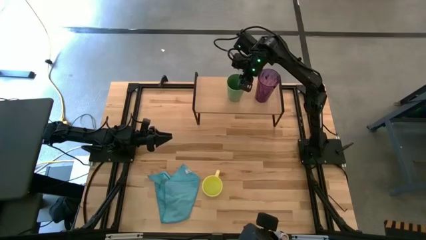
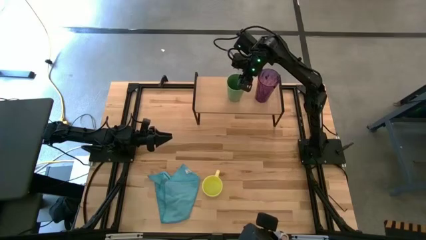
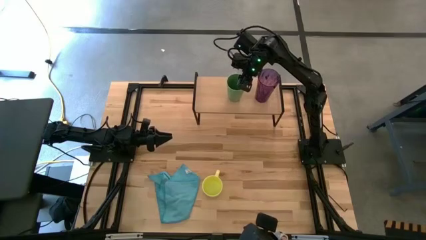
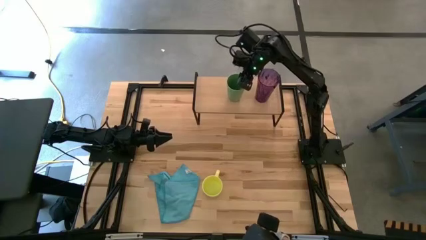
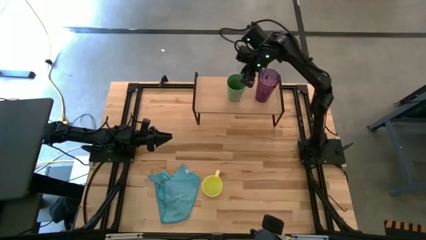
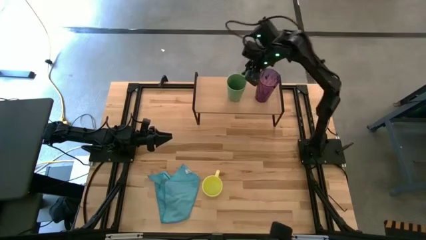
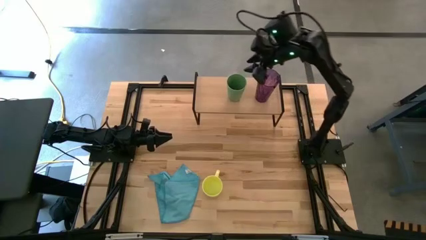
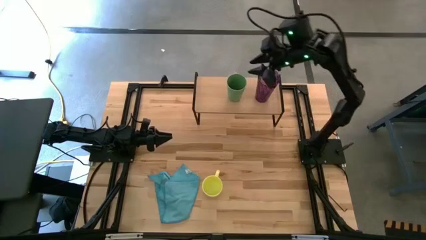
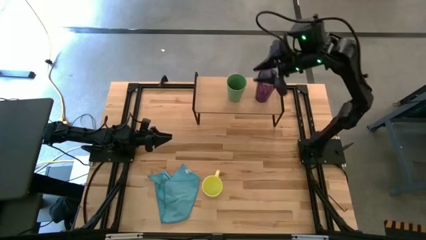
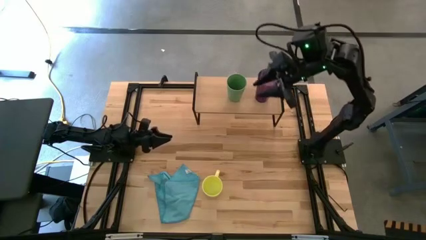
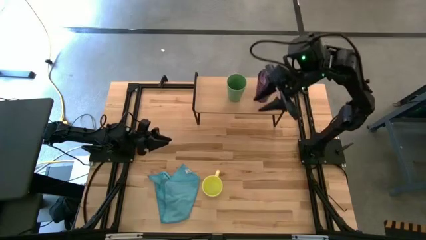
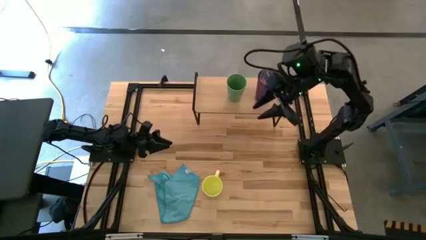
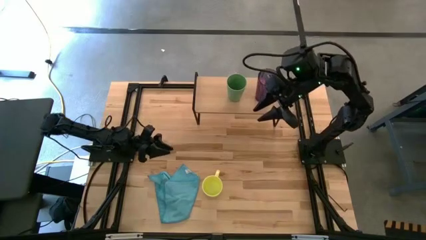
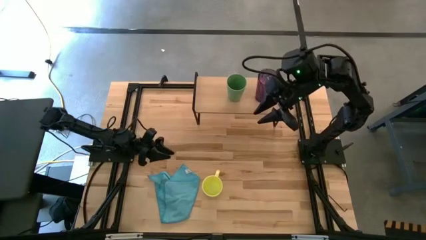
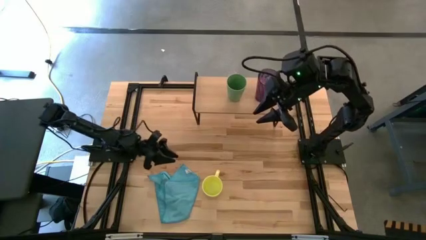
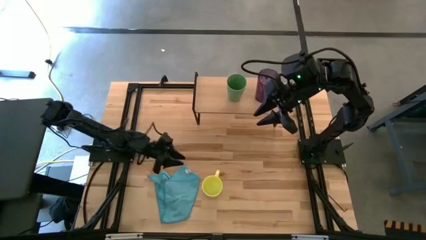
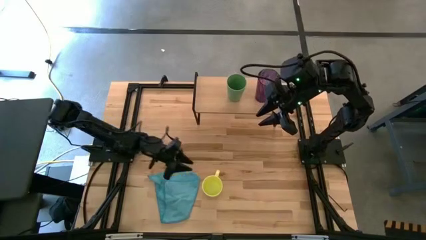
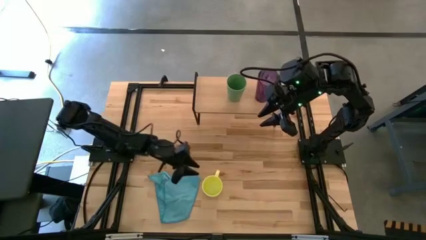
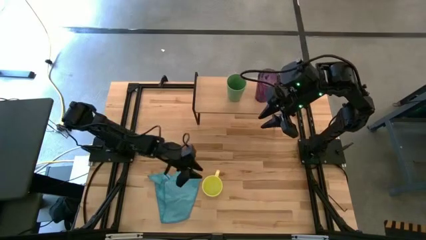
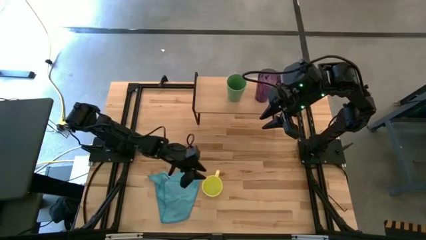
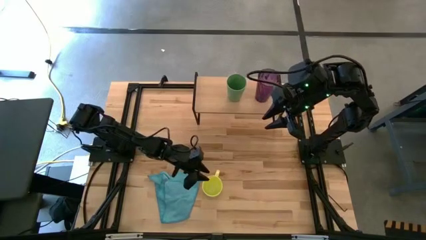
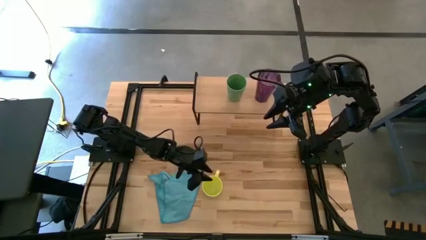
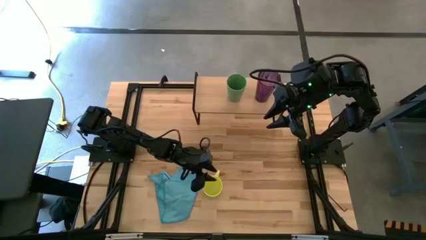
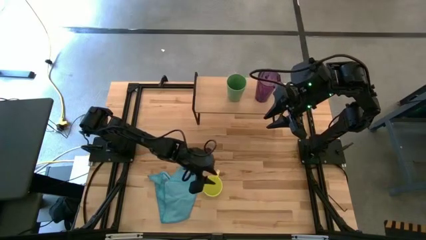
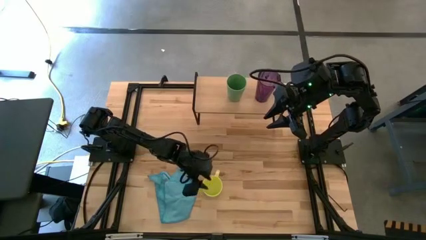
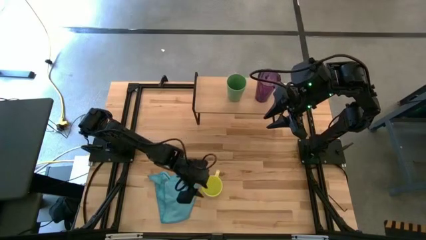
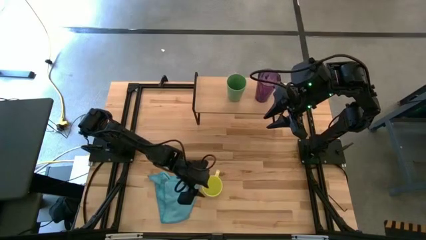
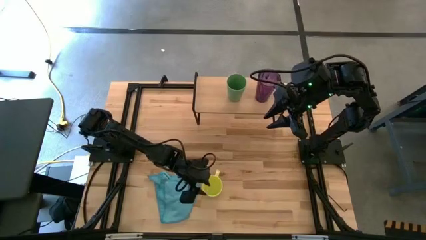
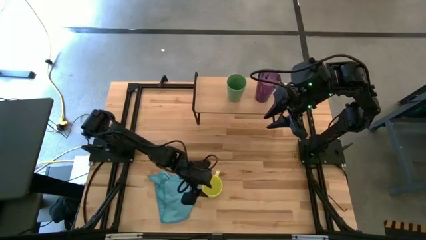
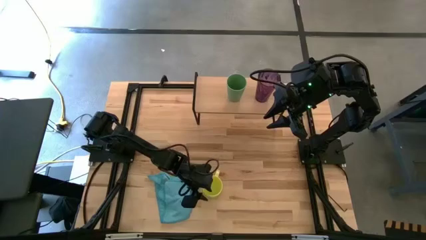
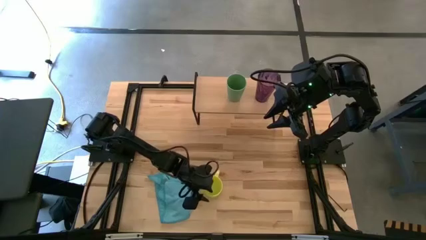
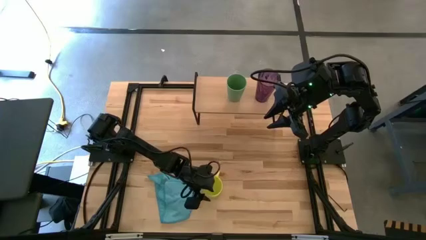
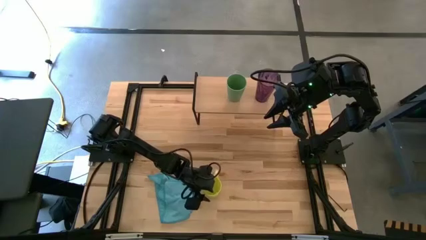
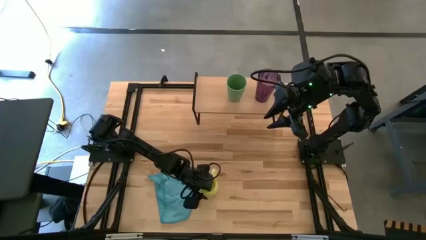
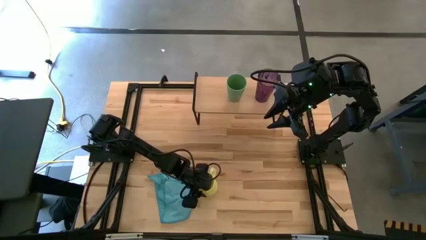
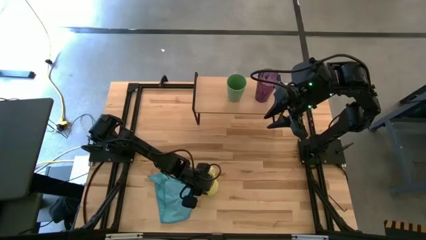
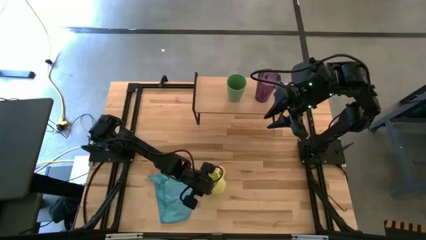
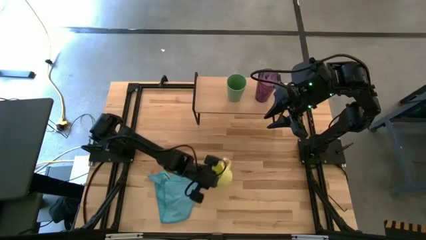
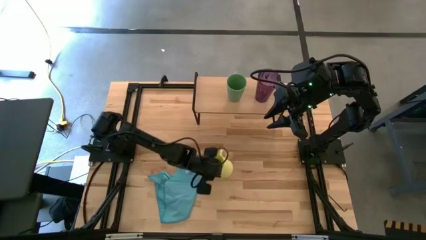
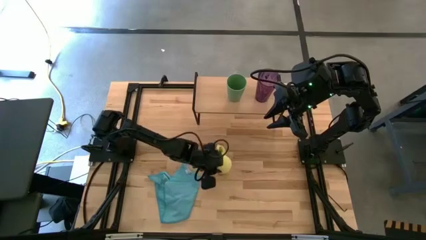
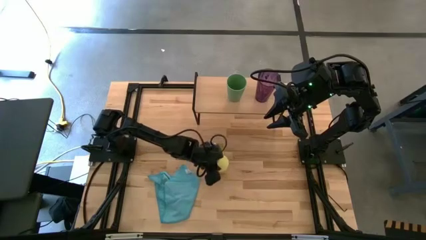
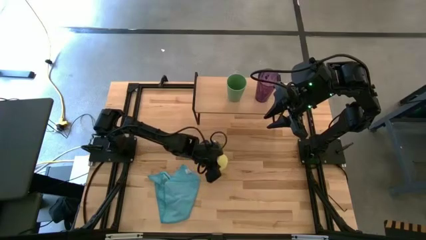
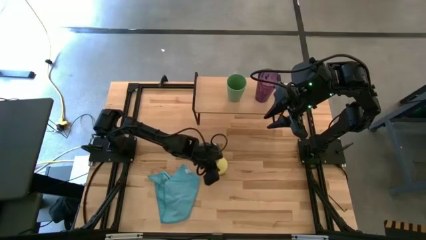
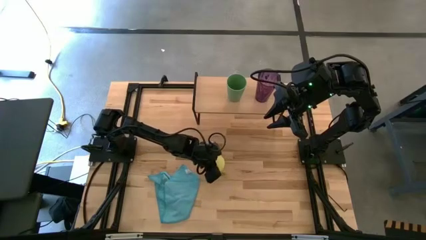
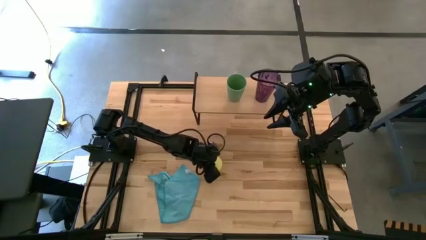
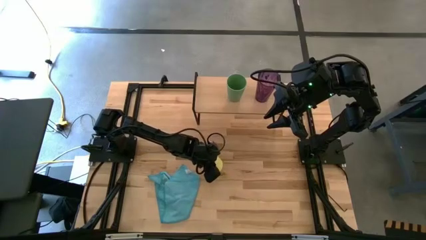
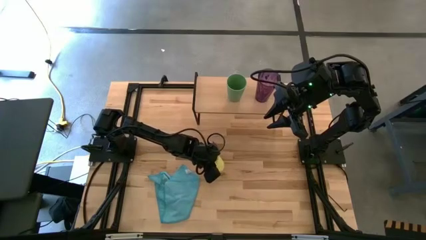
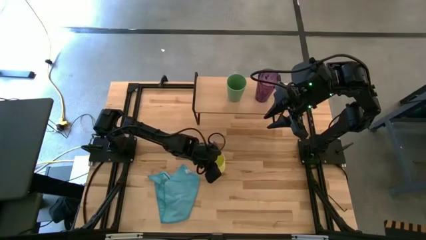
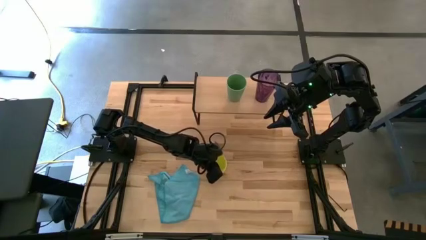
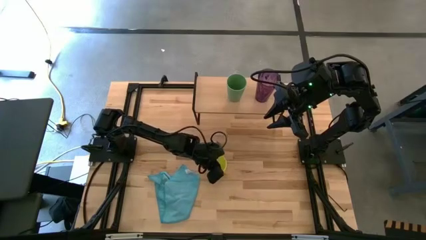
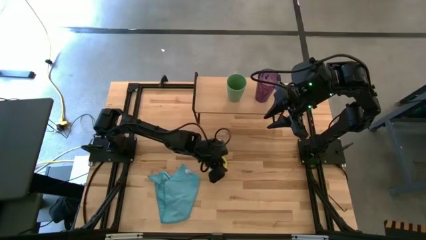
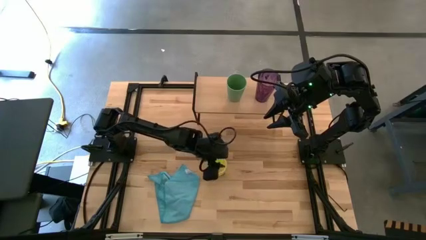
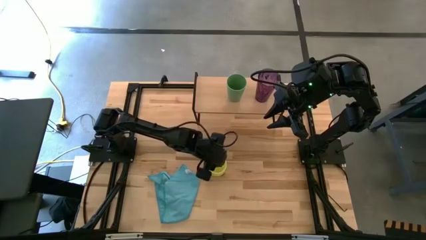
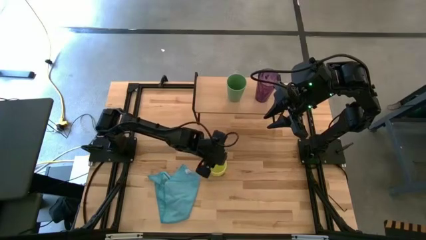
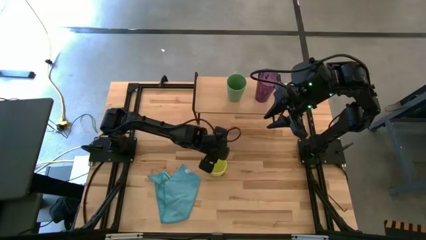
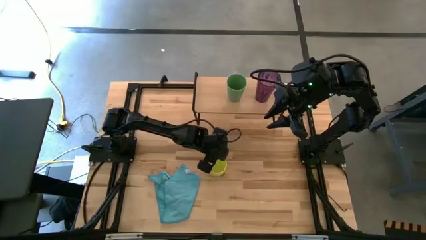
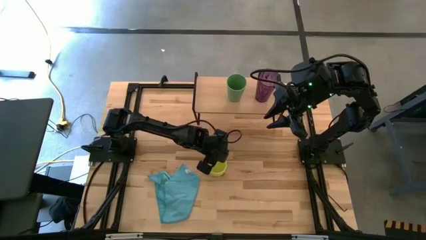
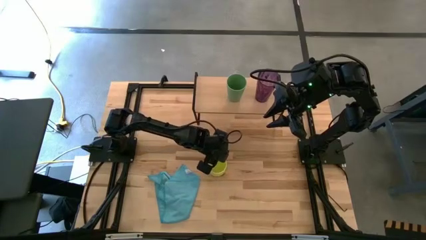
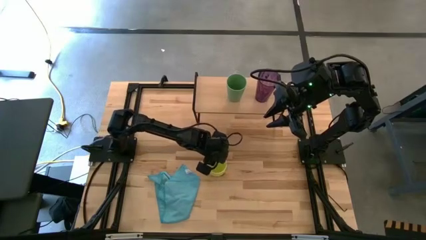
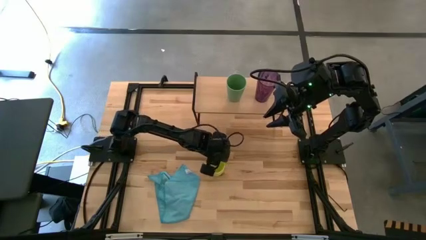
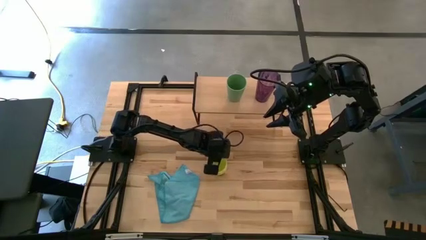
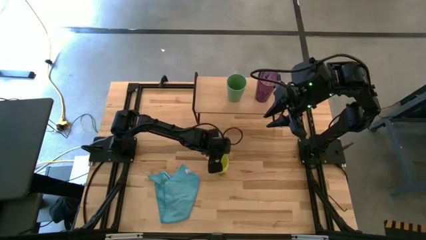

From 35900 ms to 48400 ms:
Task: Stack small to large cups/mugs on shelf
Put the yellow mug on the shelf
